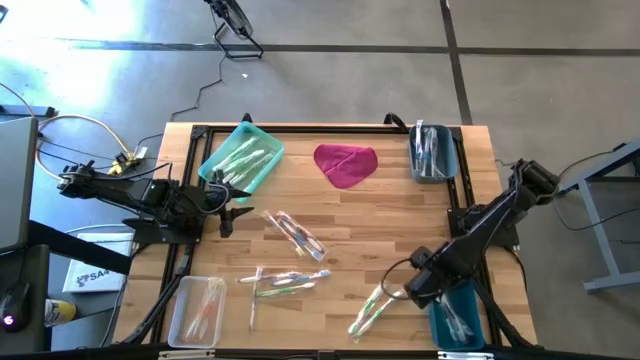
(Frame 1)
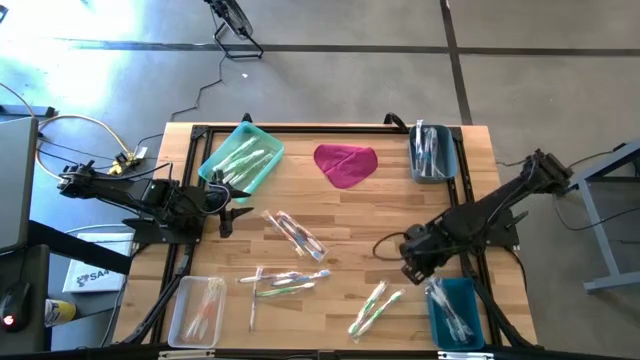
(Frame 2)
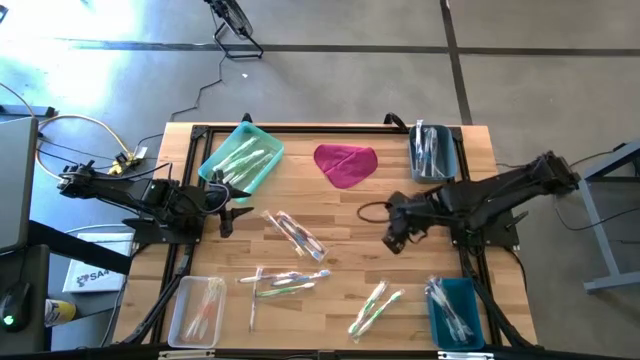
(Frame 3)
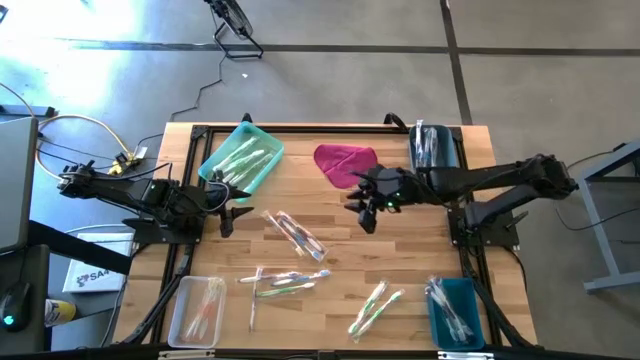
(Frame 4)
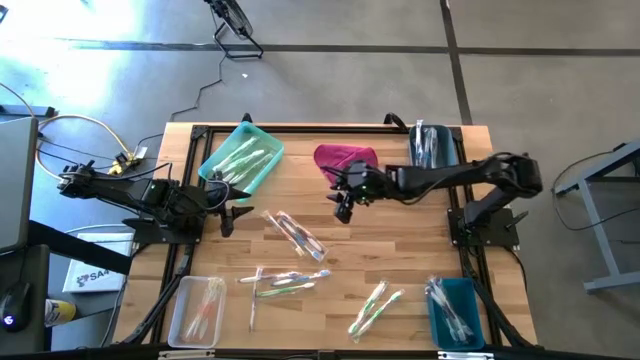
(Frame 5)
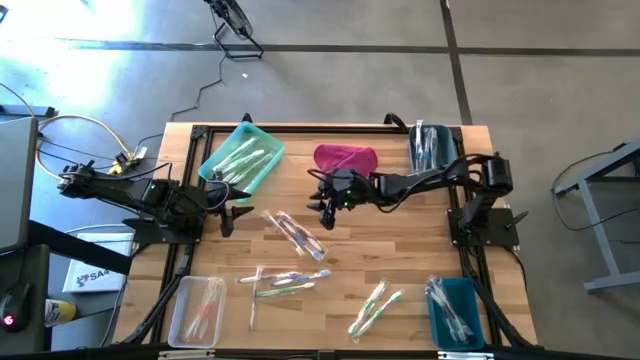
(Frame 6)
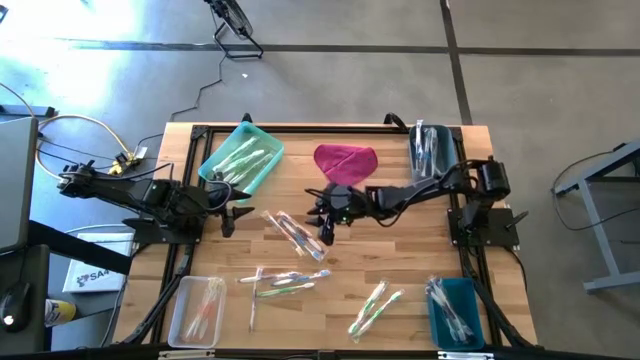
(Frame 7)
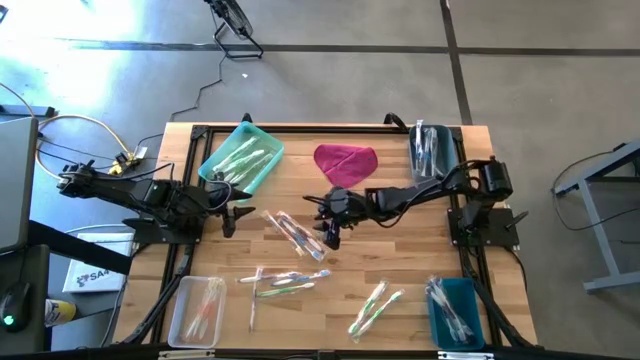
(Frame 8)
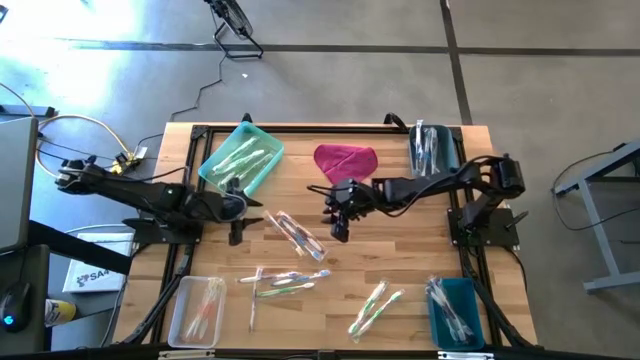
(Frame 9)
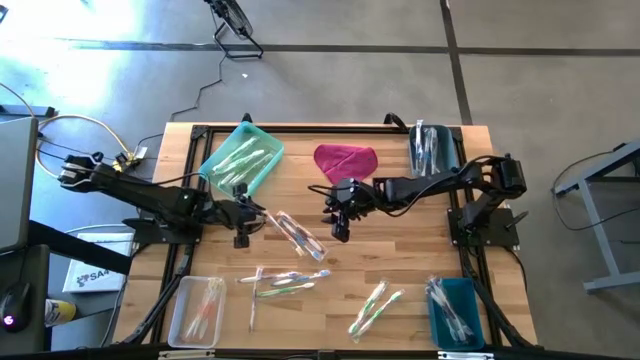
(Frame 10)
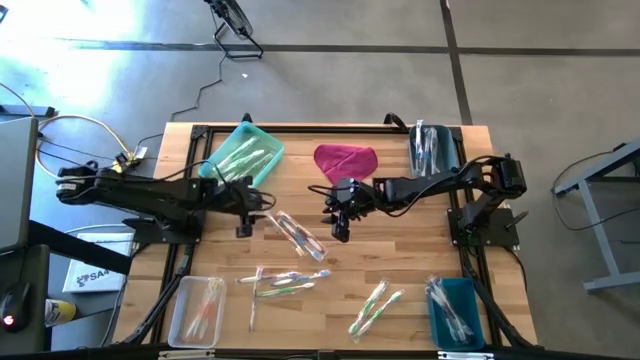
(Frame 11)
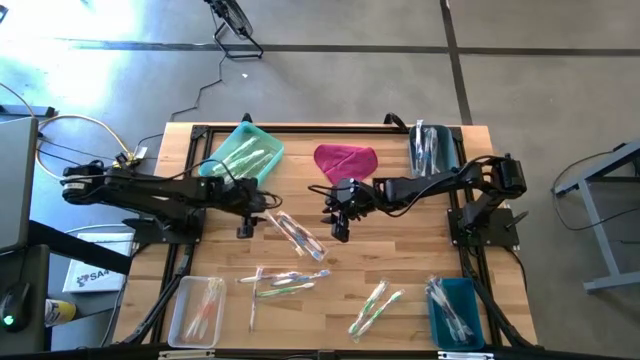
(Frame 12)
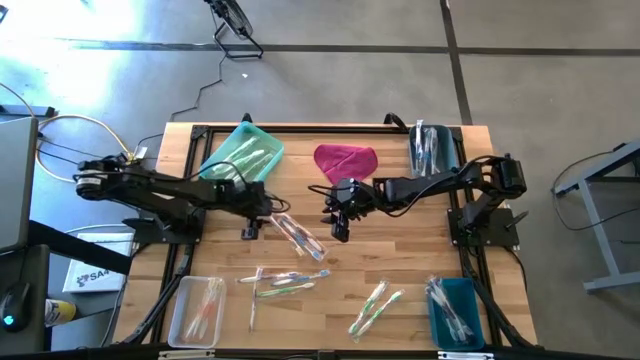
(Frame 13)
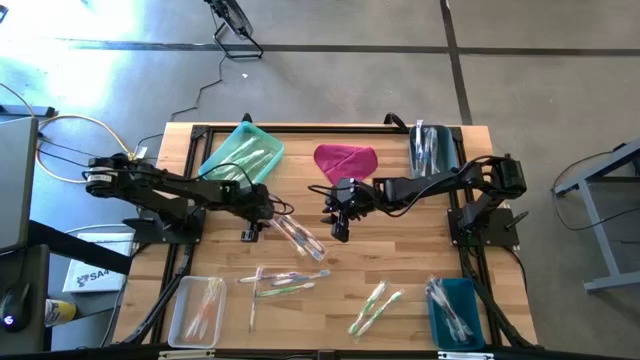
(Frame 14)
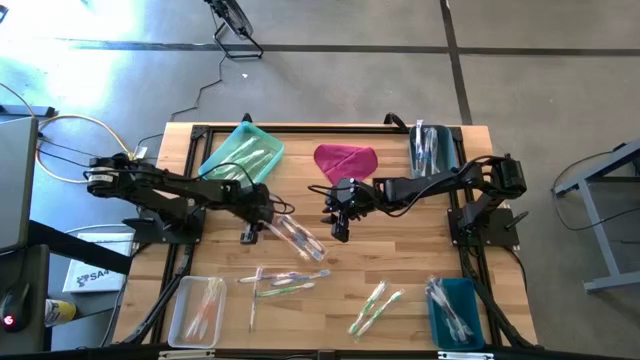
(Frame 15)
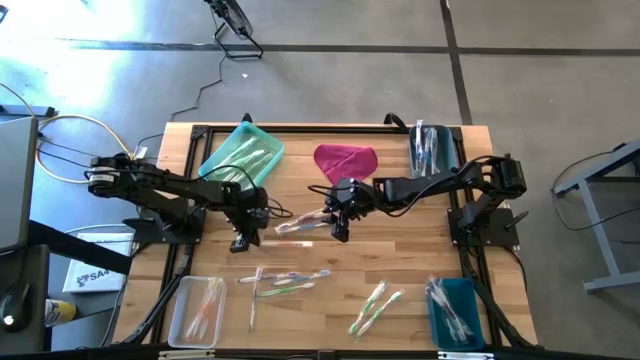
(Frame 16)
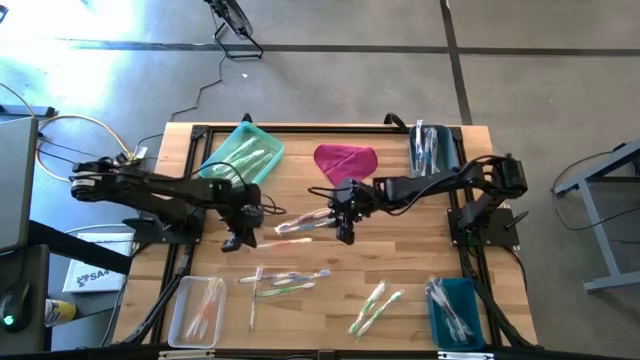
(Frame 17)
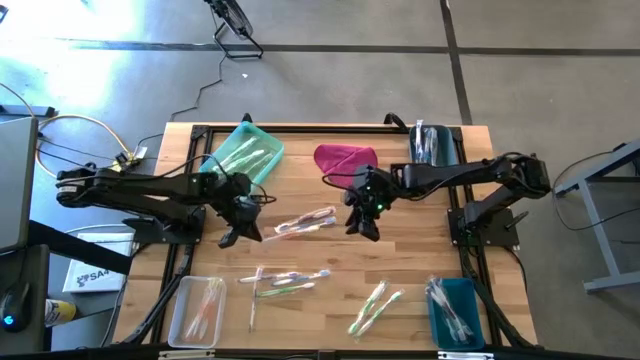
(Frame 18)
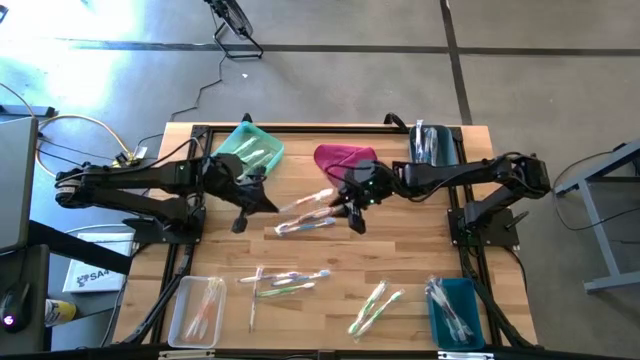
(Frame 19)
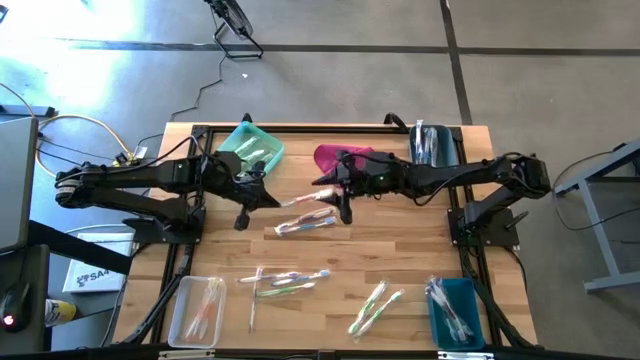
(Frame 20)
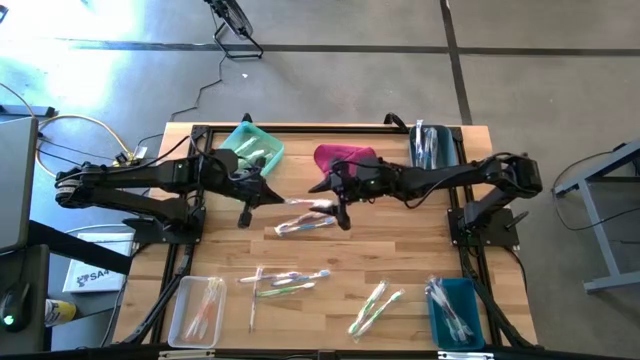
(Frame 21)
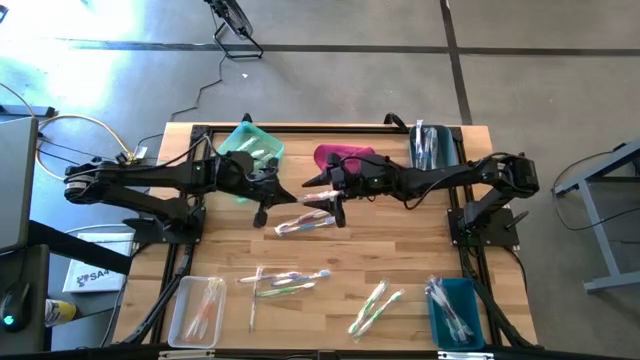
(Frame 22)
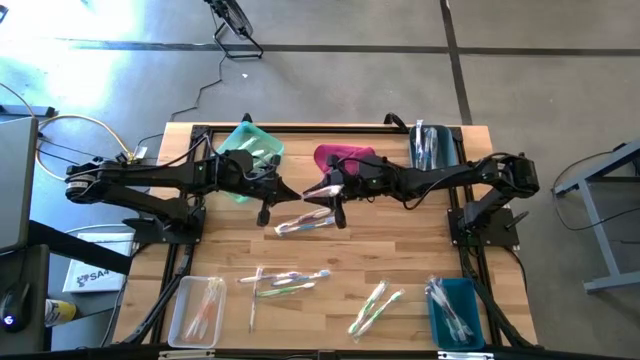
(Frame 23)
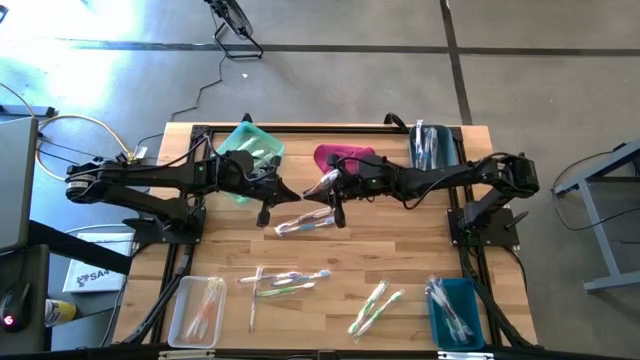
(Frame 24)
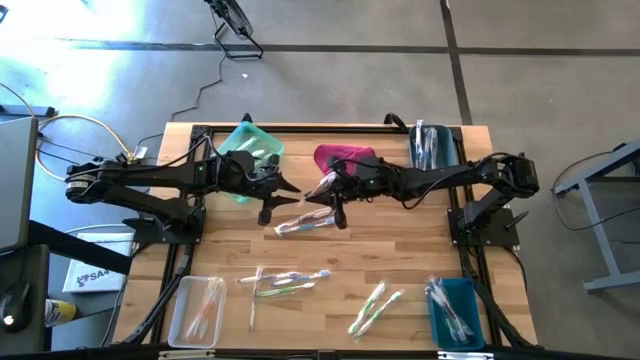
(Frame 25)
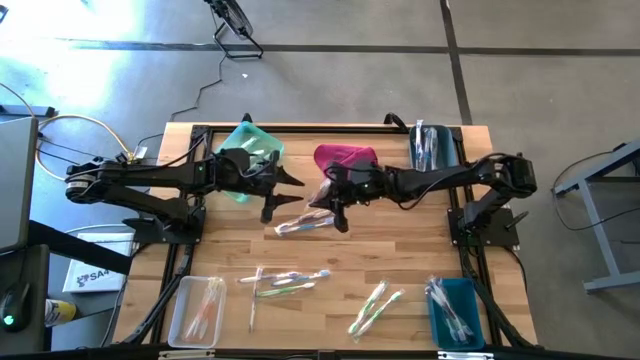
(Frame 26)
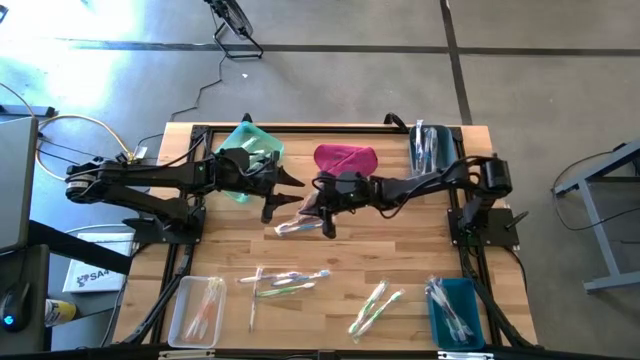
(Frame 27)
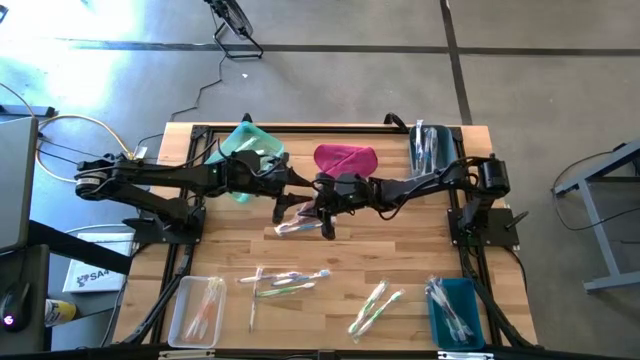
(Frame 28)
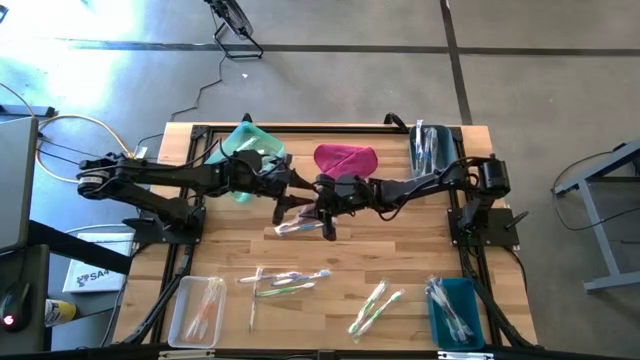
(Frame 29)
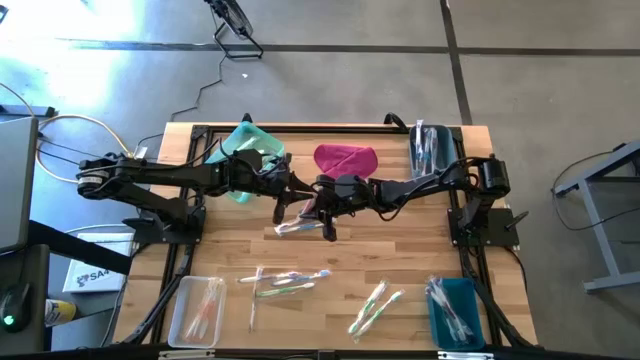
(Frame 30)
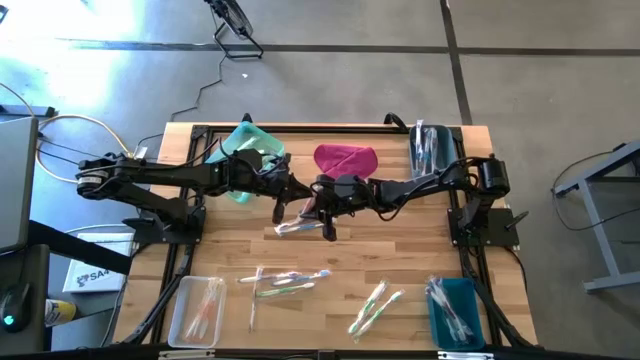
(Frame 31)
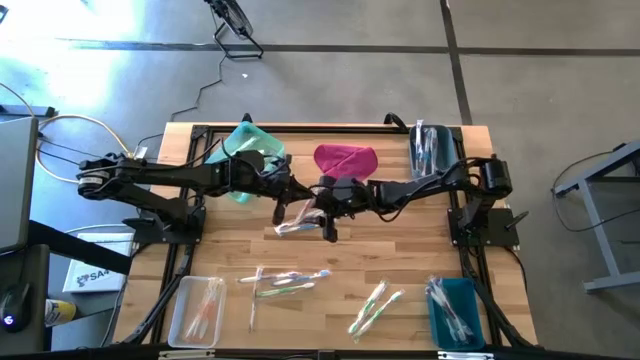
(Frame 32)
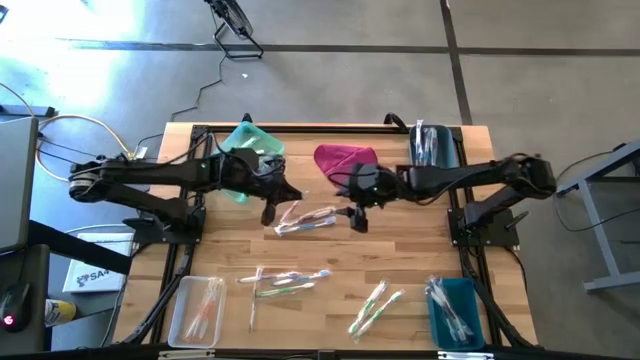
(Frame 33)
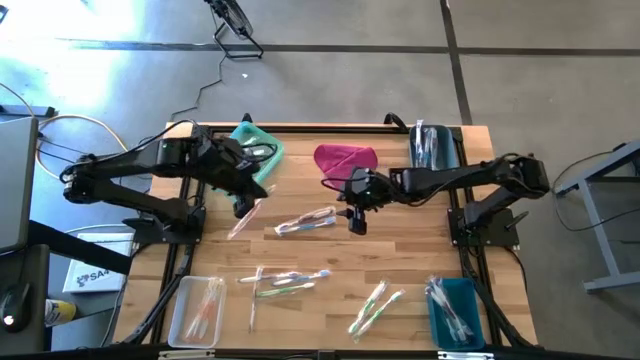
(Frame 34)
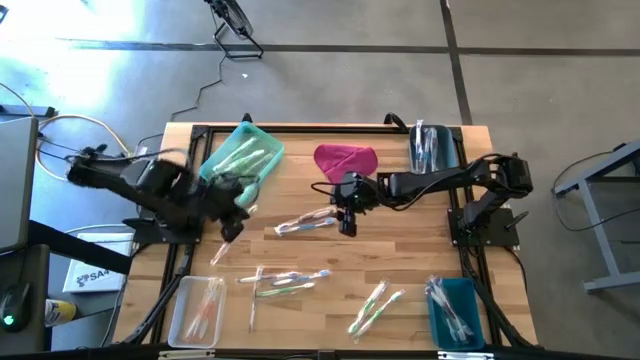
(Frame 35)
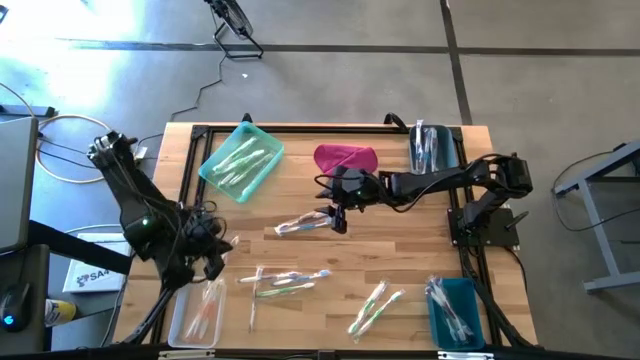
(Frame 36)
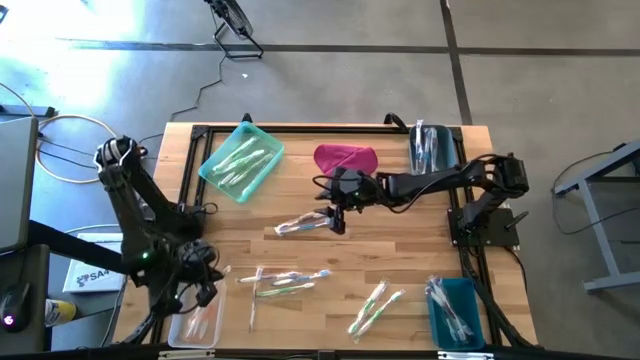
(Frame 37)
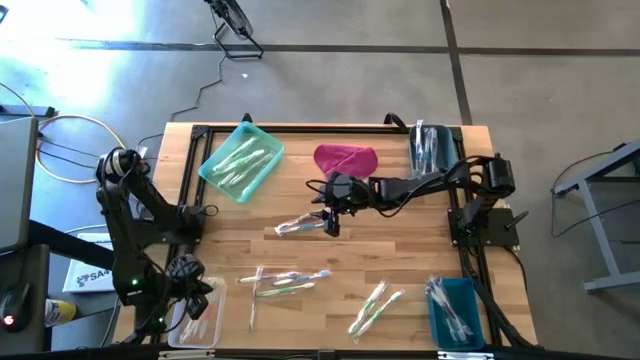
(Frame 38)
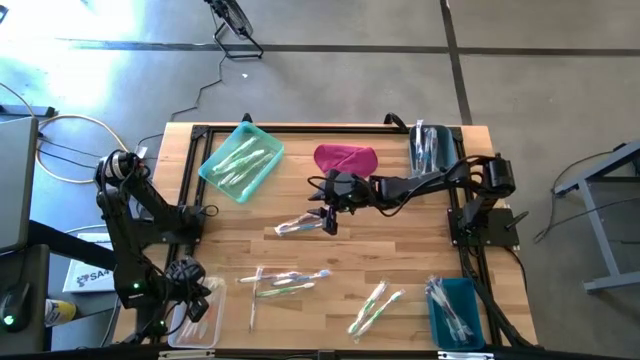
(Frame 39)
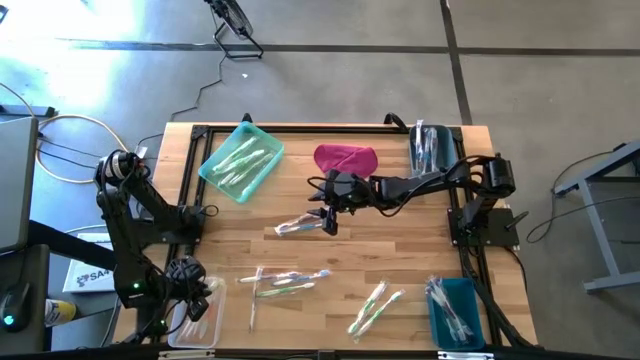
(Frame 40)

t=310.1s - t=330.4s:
Task: Pick & Place Toothbrushes
Put the orange toothbrush to the transparent bin

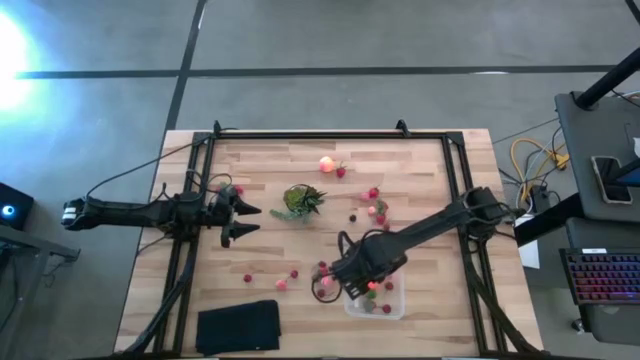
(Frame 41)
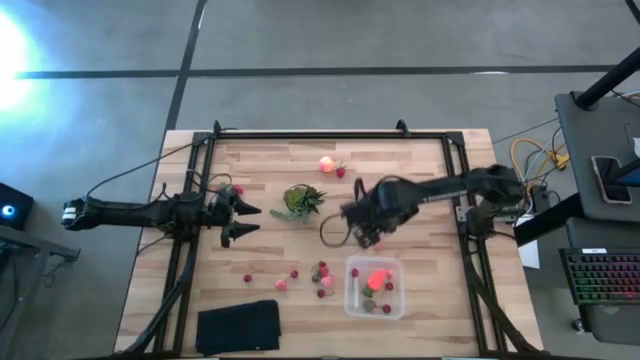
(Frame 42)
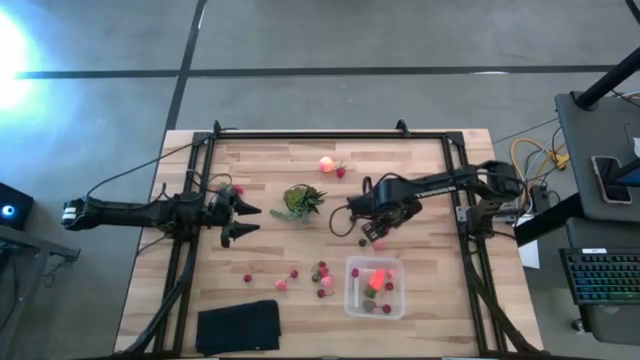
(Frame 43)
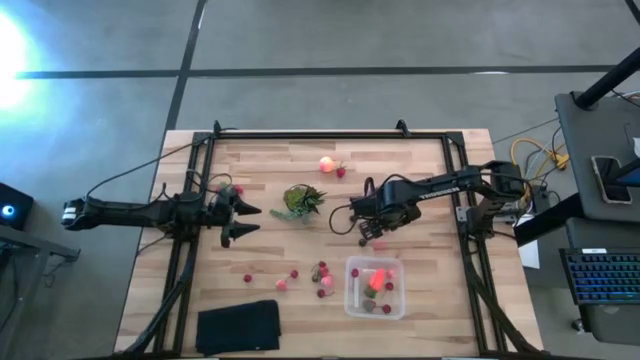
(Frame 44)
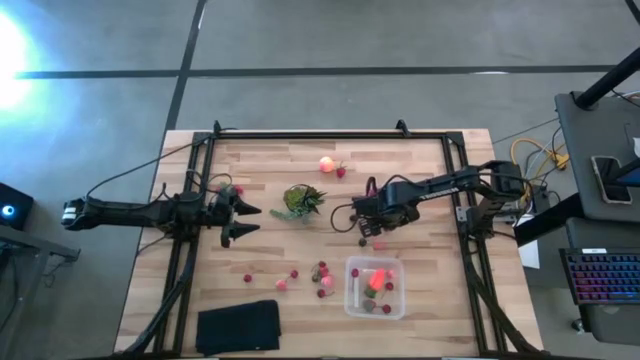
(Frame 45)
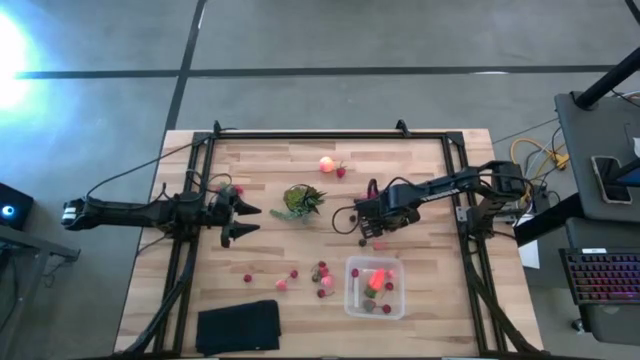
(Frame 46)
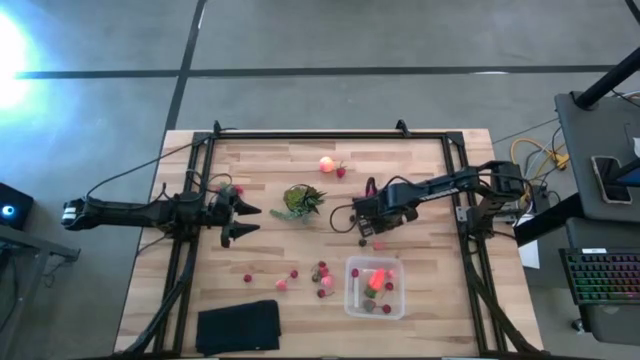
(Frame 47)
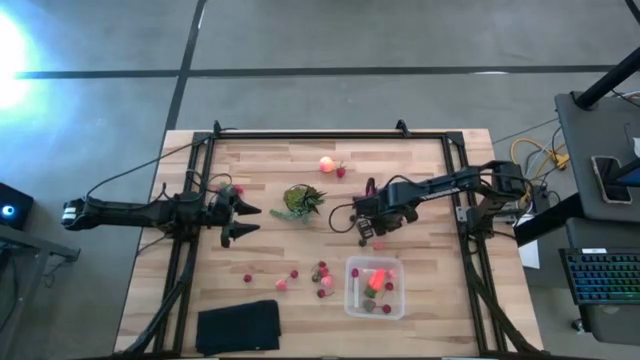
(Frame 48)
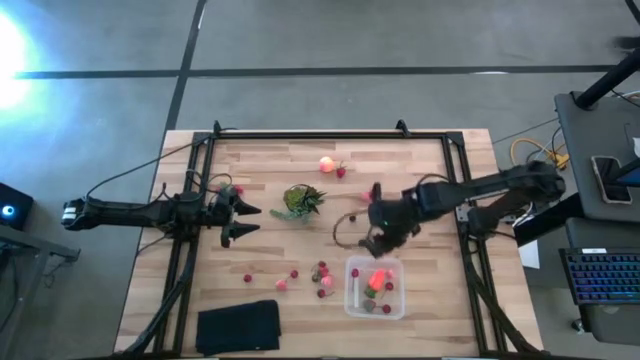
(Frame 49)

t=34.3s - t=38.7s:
Task: Pick and placing Produce into tupperware
Put the cherry into the bin
